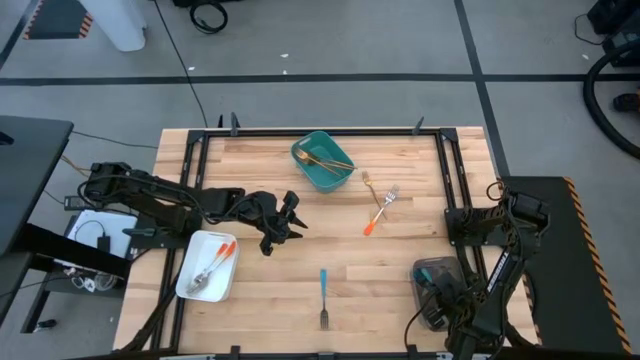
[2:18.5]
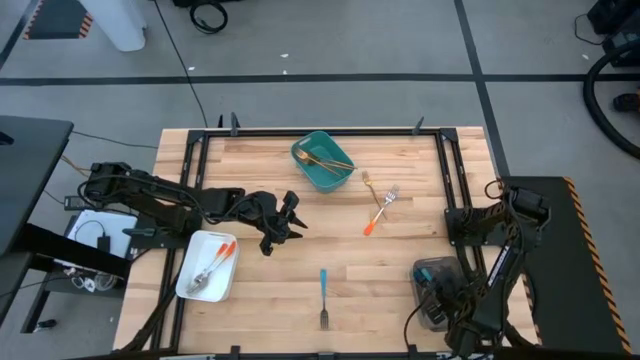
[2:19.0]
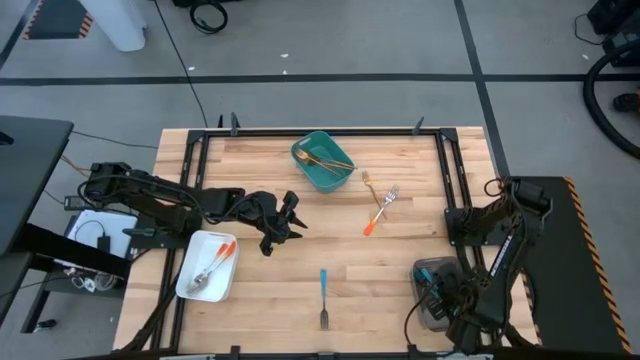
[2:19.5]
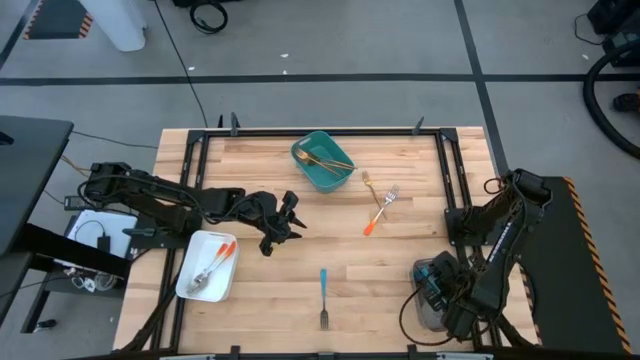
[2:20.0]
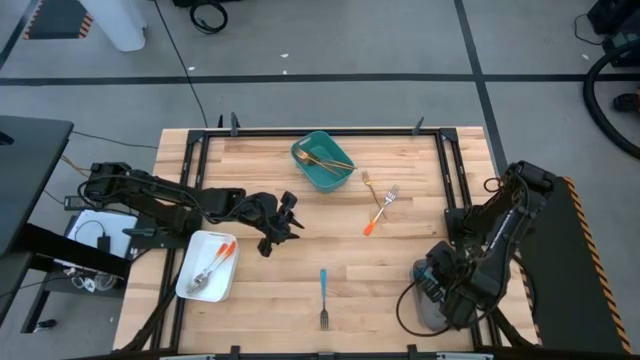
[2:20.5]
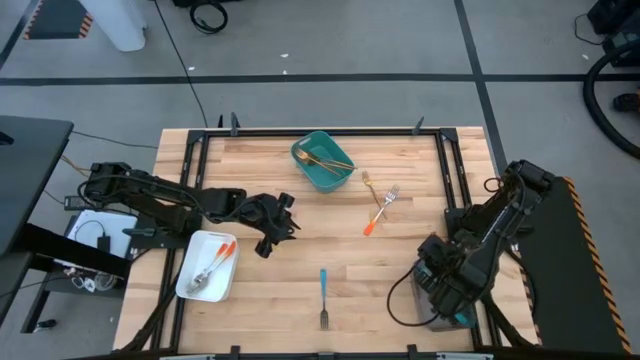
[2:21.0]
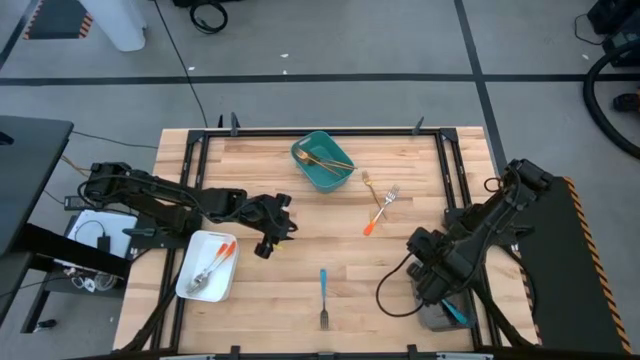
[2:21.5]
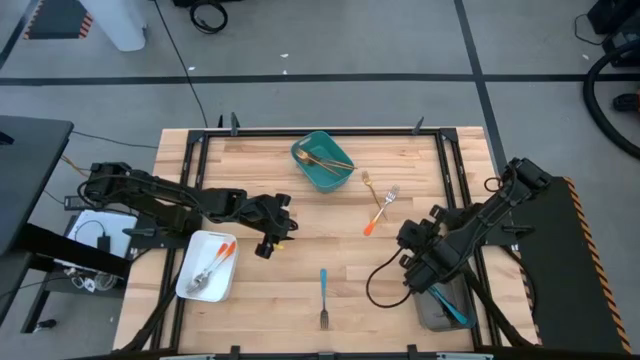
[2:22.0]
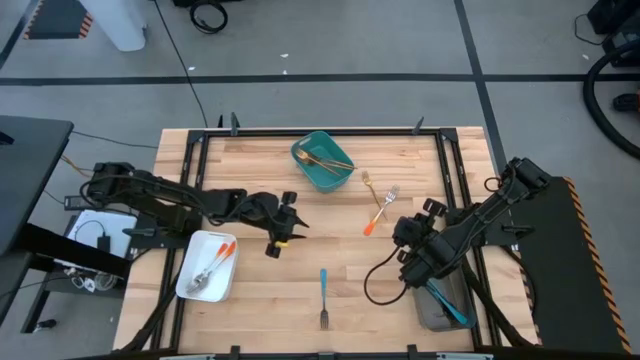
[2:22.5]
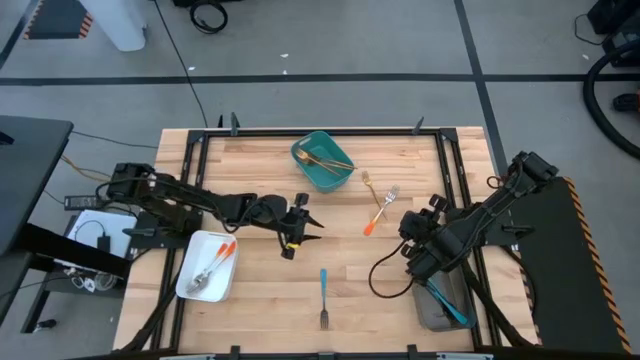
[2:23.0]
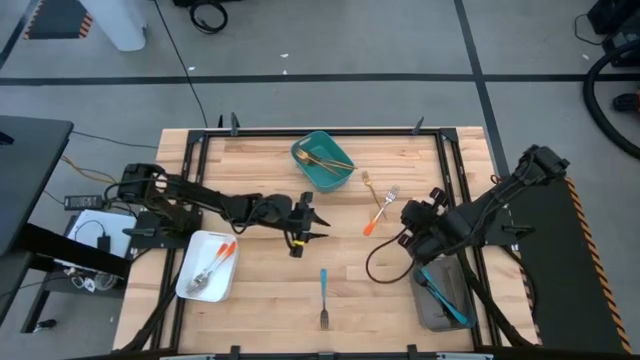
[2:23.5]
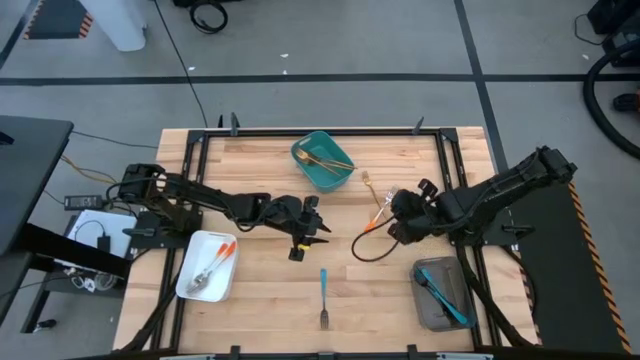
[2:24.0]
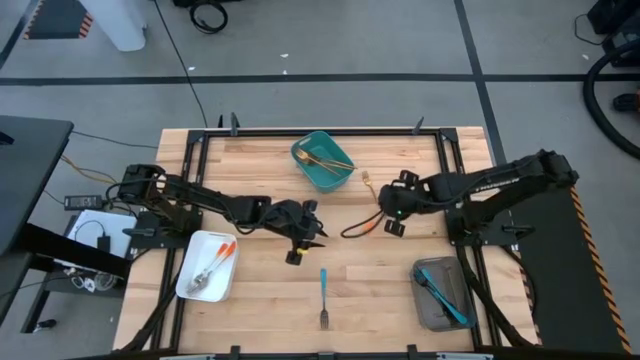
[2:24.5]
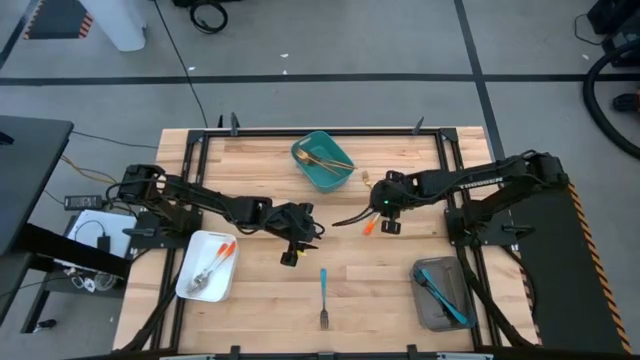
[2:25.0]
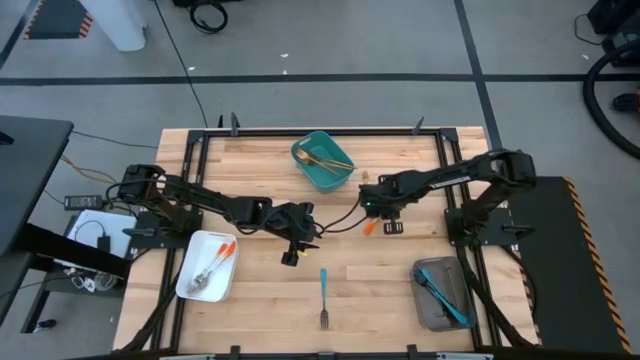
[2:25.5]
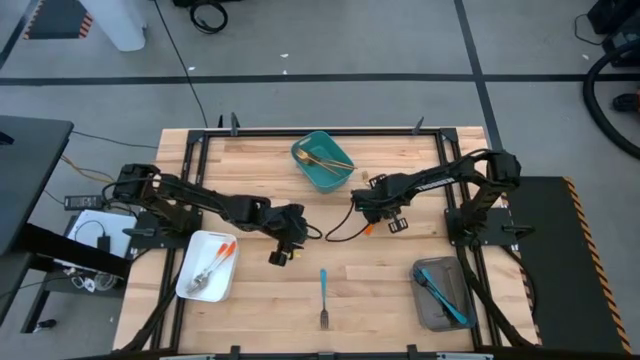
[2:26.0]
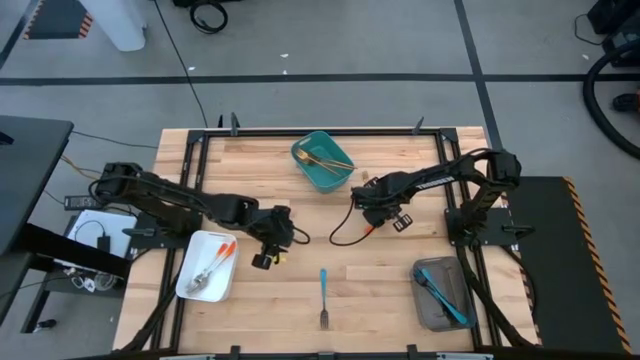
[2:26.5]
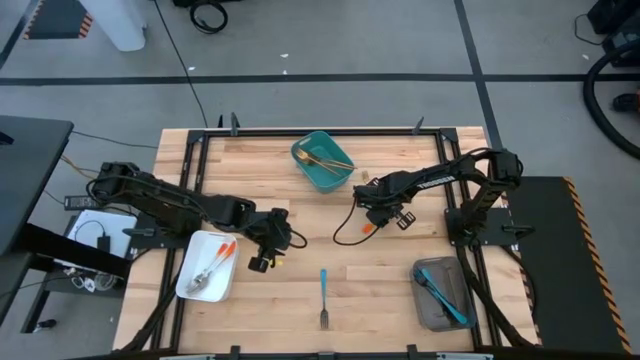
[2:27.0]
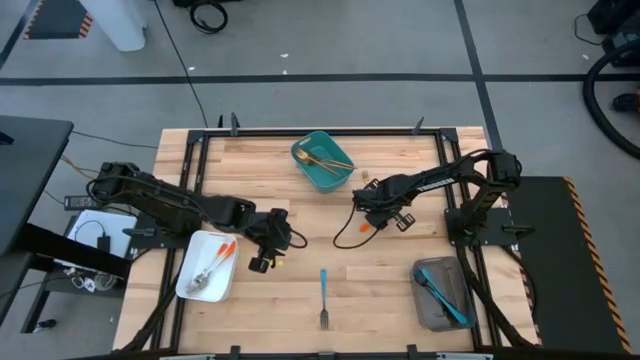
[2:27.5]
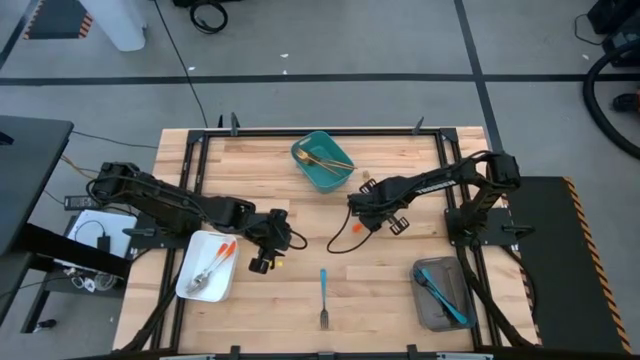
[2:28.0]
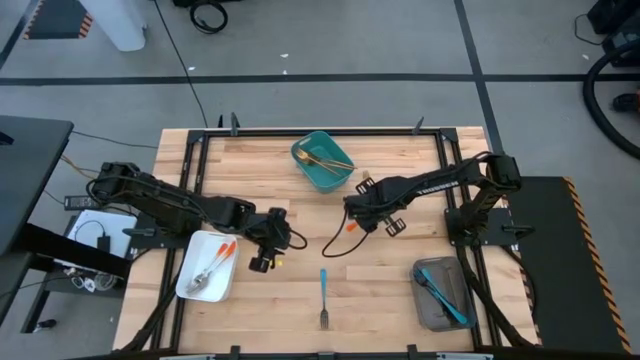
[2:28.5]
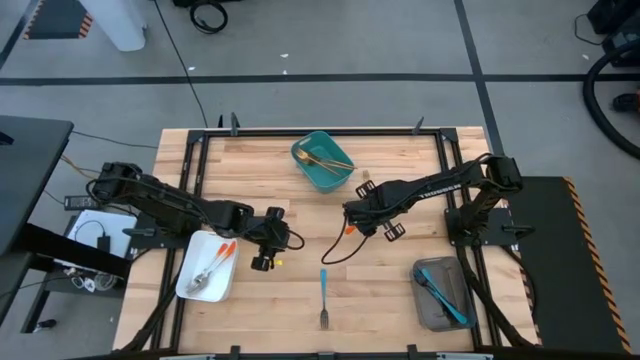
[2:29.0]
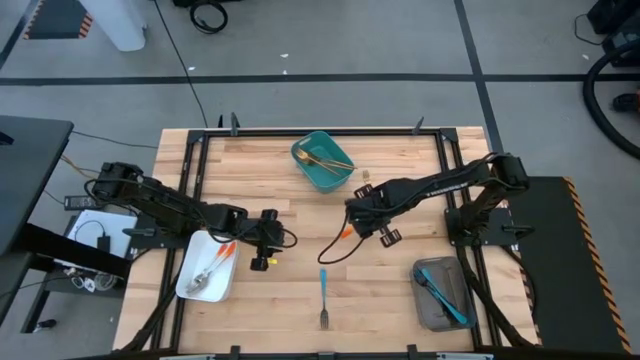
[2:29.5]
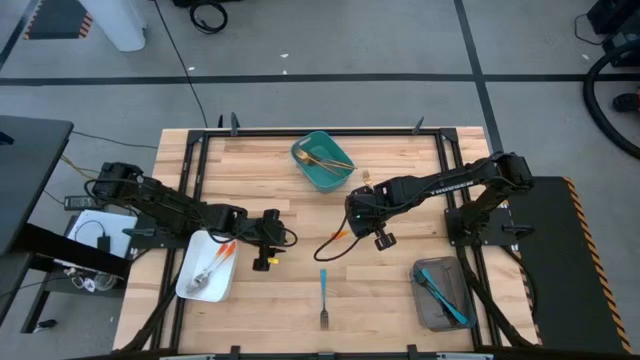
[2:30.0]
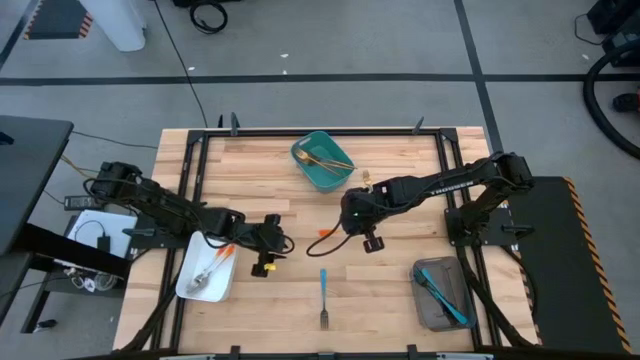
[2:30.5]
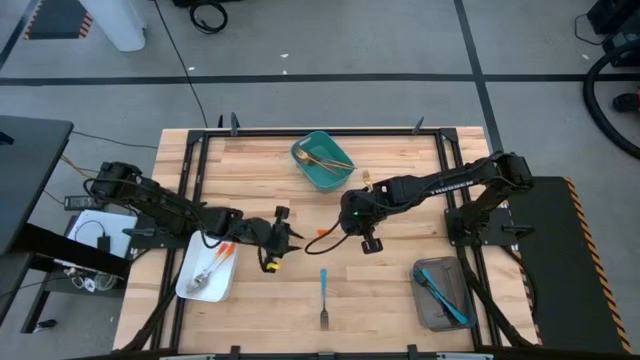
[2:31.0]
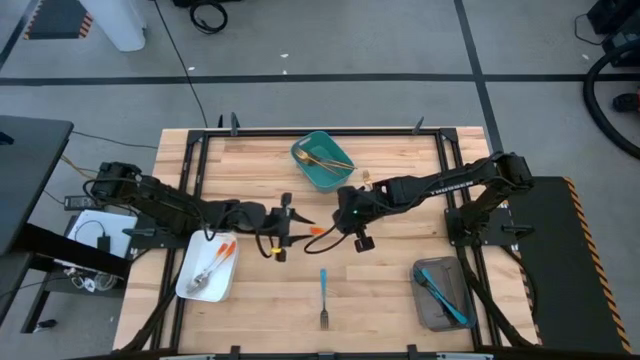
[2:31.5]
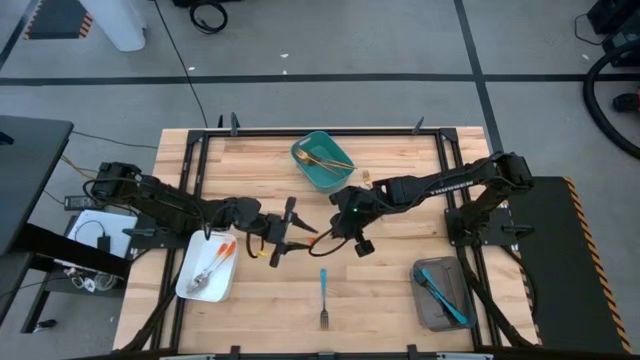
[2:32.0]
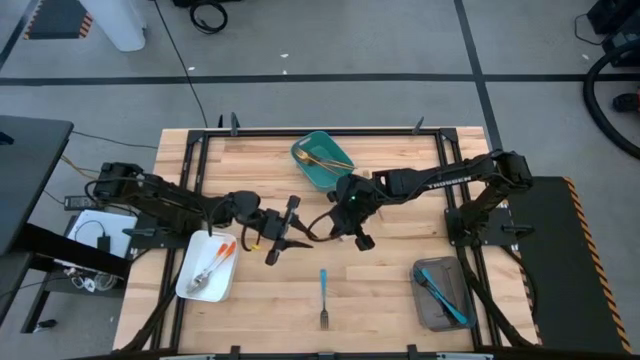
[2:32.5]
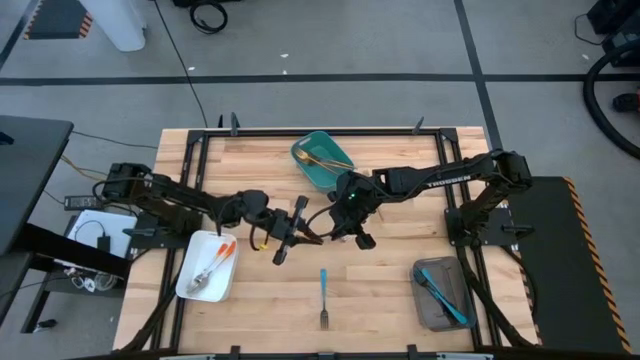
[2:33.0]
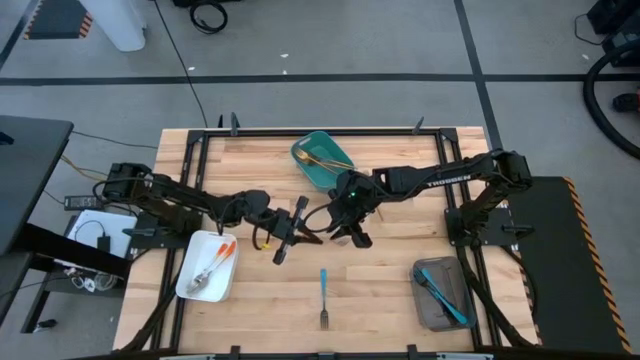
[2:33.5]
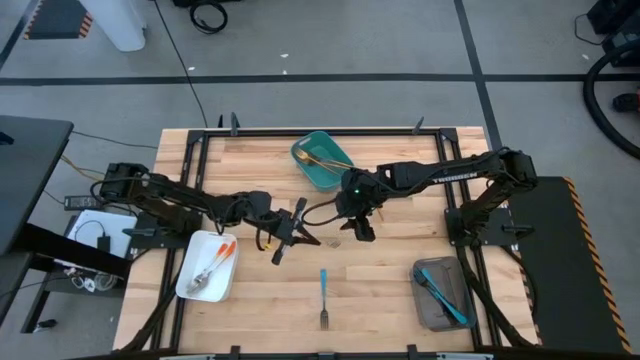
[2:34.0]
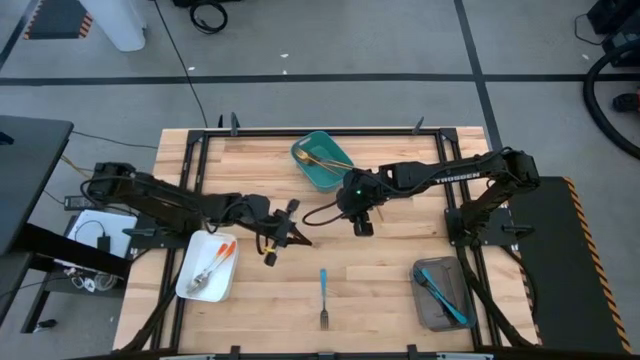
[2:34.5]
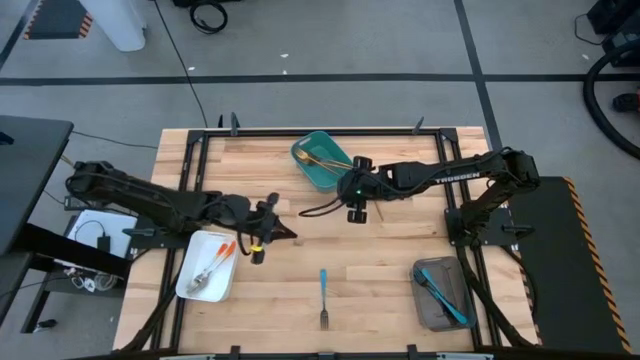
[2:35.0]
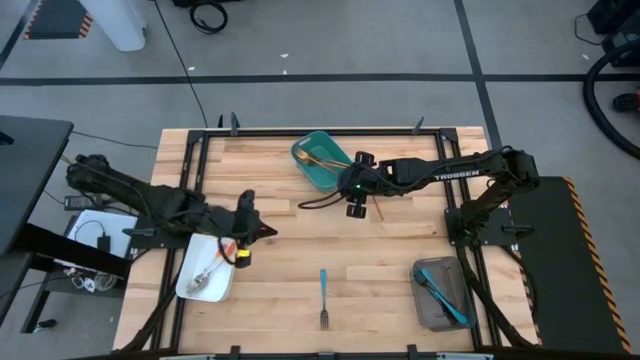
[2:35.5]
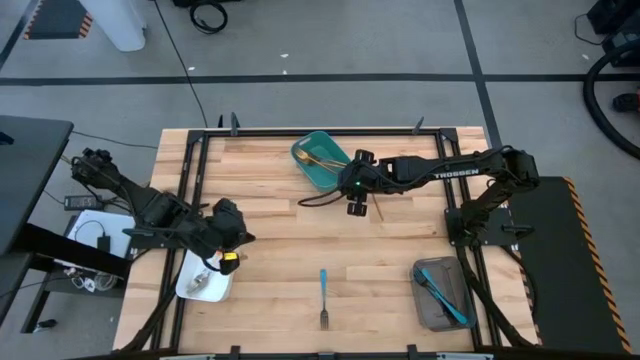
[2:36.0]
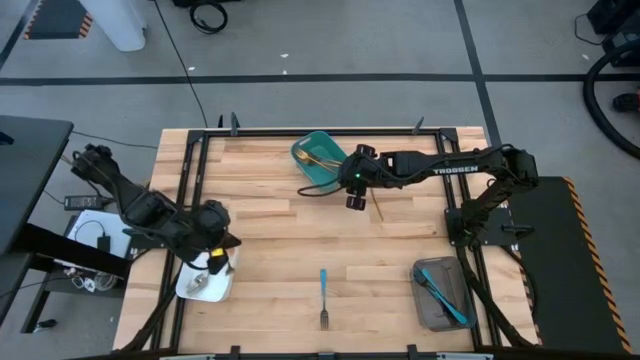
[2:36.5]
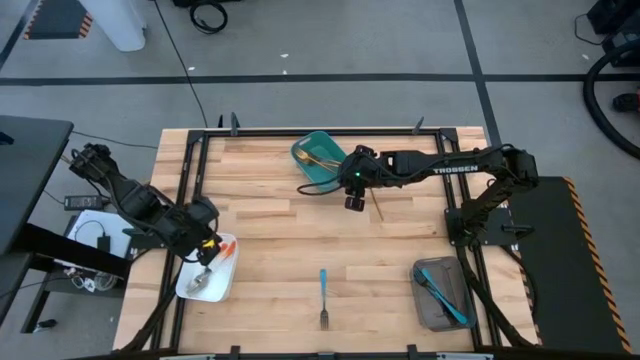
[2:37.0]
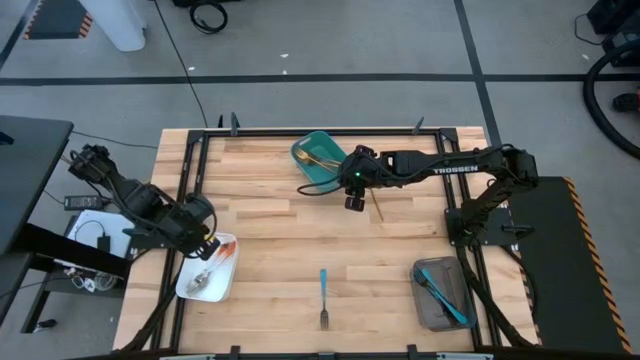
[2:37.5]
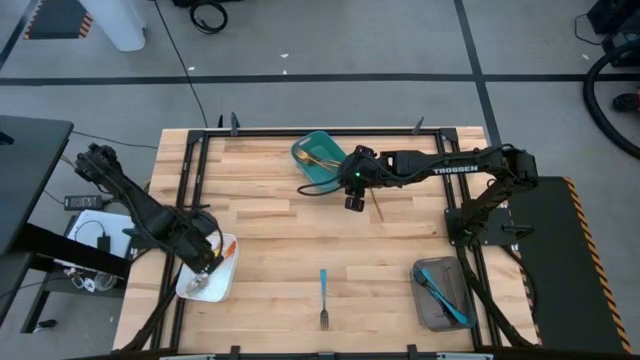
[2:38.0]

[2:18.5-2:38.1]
Task: Sort silverware by color (type)
Put the orange fork into the white bin
